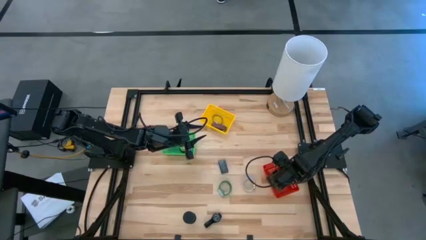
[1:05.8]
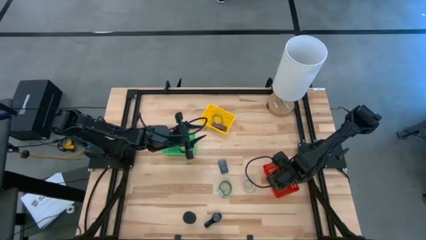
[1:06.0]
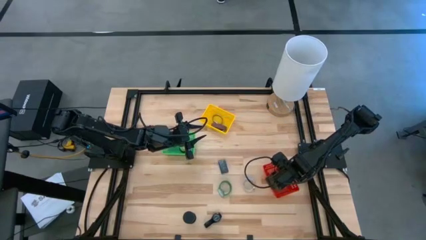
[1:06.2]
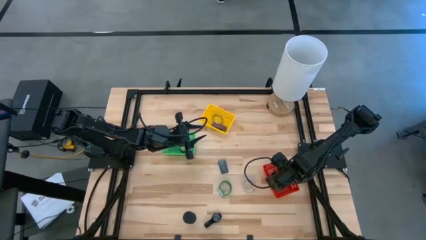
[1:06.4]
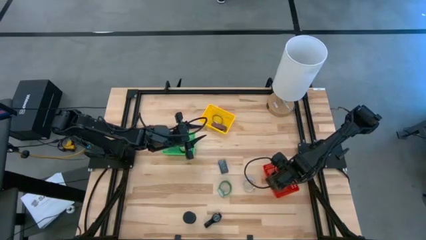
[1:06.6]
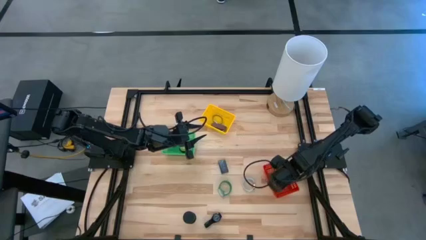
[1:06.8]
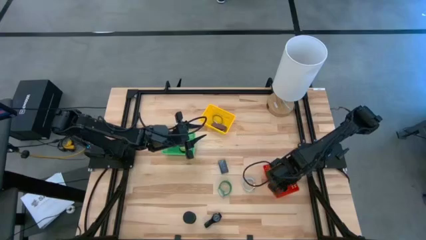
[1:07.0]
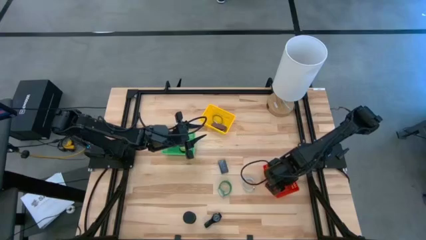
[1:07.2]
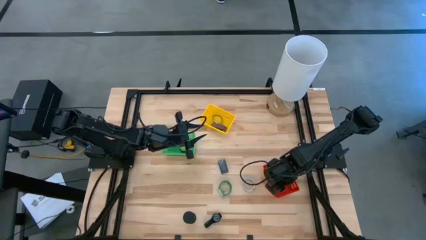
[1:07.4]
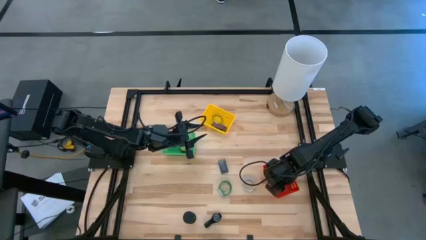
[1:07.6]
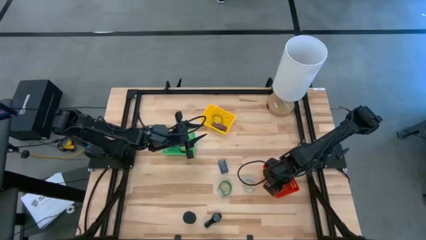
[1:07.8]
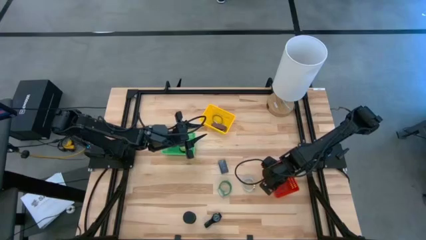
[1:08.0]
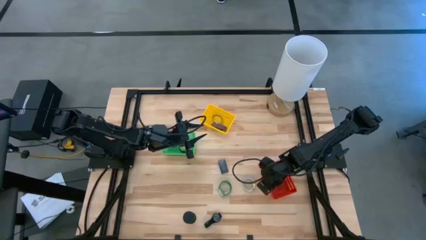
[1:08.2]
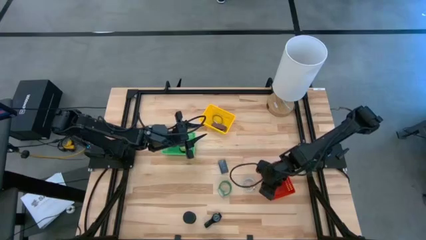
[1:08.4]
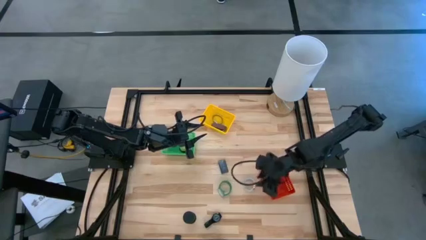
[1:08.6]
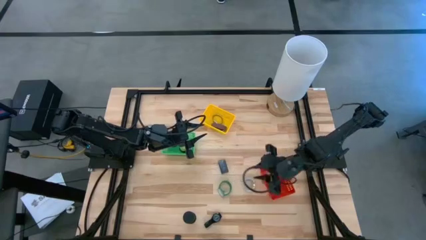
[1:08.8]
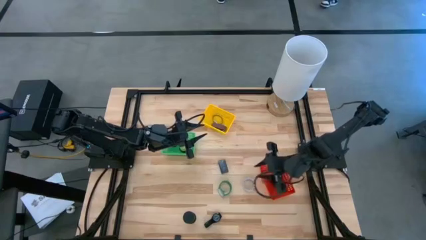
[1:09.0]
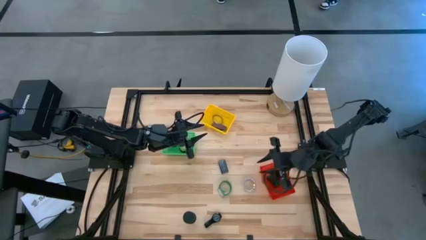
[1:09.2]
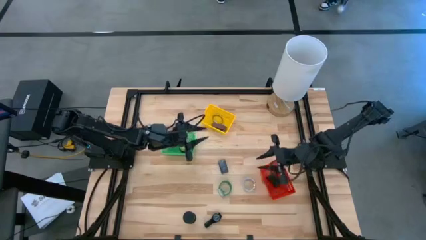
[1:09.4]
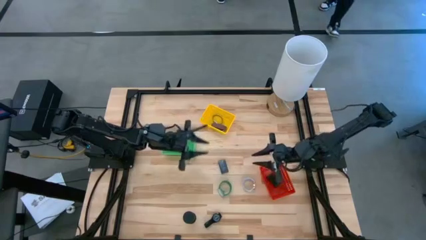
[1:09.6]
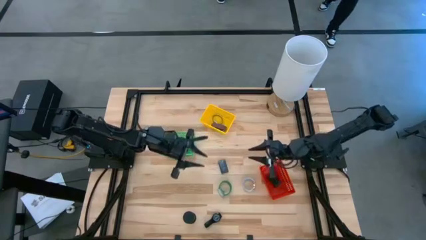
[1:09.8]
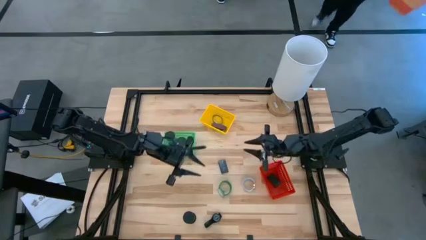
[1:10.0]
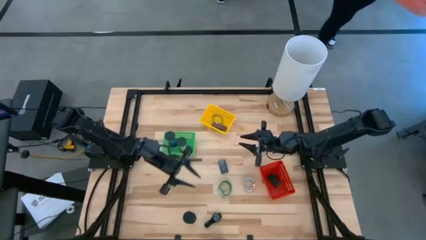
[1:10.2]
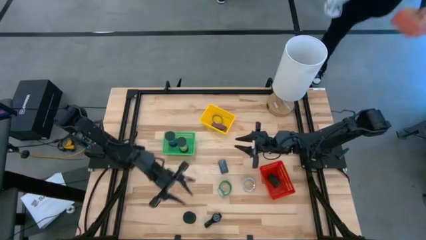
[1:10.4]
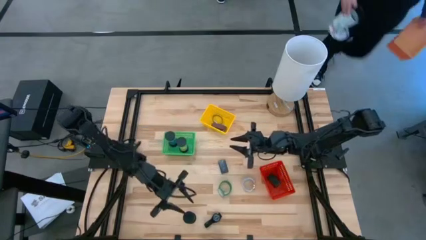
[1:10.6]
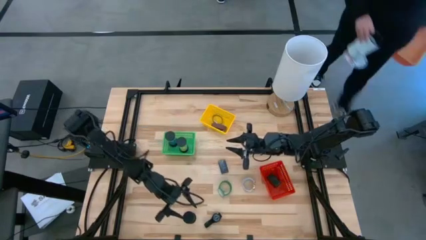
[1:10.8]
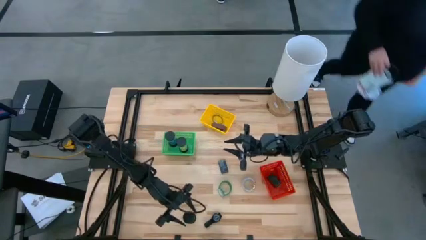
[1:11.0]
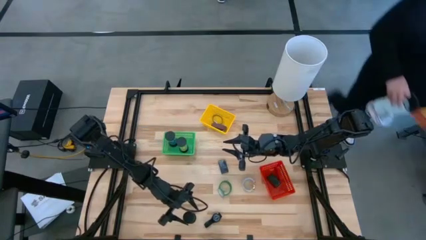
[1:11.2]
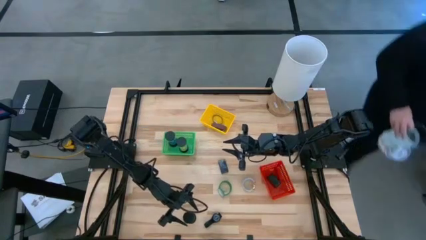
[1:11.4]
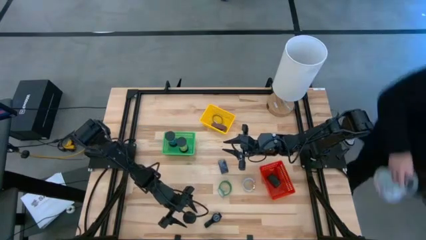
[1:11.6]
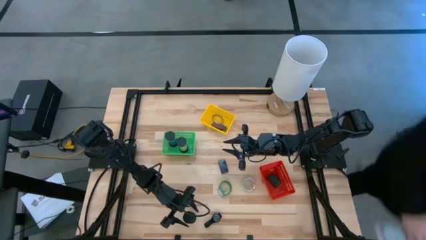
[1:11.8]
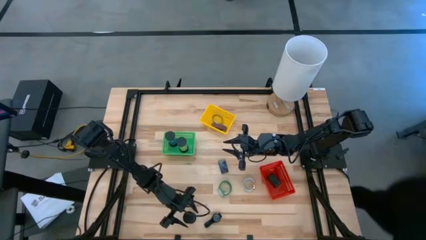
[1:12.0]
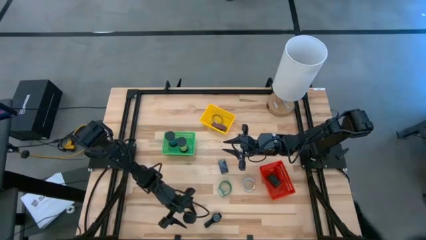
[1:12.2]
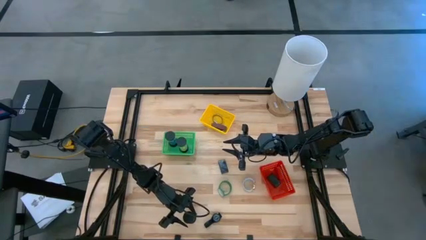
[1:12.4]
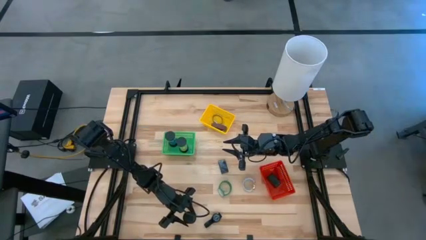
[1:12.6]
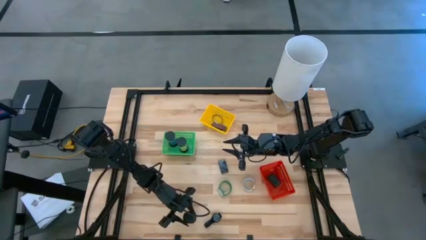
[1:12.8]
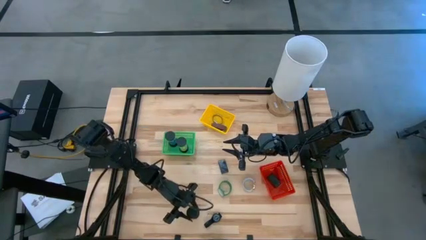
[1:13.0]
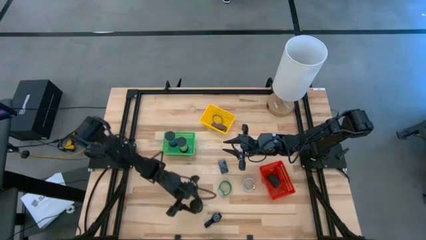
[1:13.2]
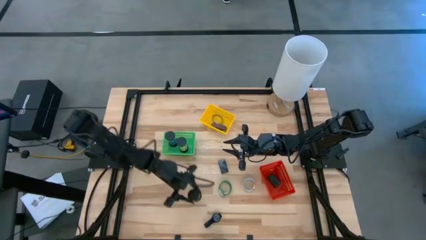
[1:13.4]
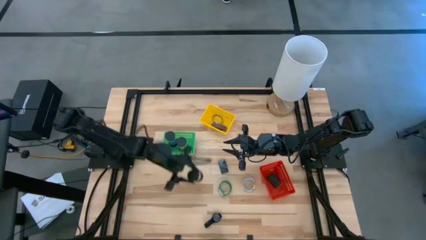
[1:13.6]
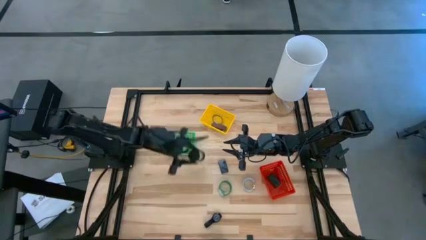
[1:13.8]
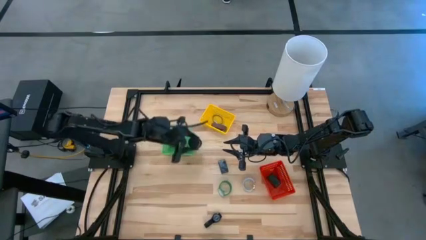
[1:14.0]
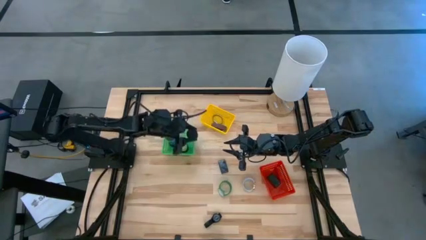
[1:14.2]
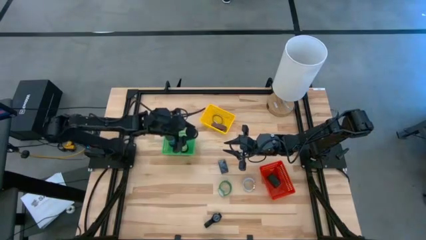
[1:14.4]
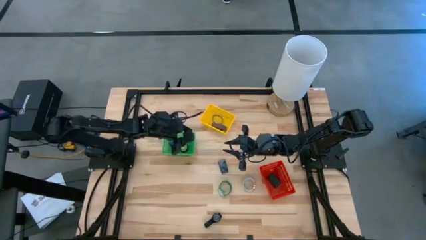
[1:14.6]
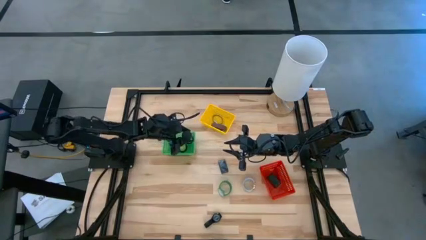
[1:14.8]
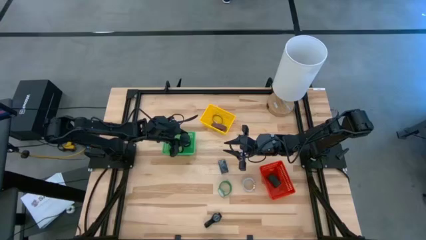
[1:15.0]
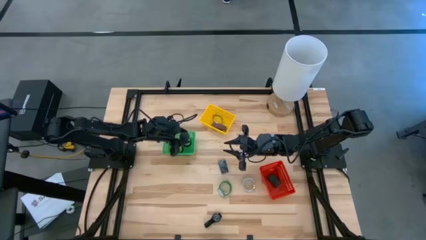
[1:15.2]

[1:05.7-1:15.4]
Task: Pick & Place Office items
Put the green hourglass into the green basket

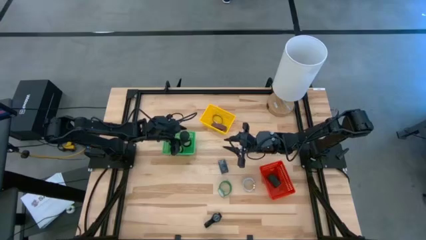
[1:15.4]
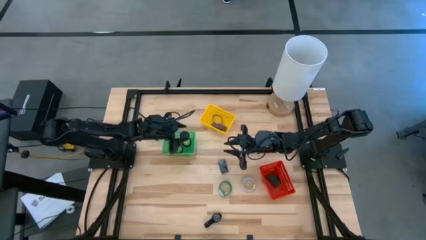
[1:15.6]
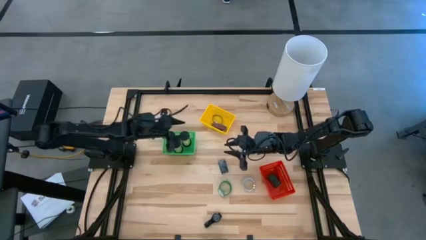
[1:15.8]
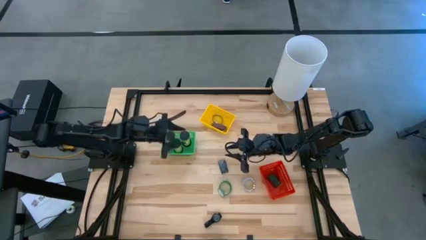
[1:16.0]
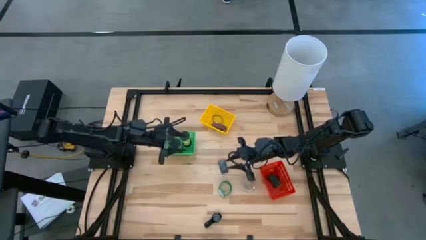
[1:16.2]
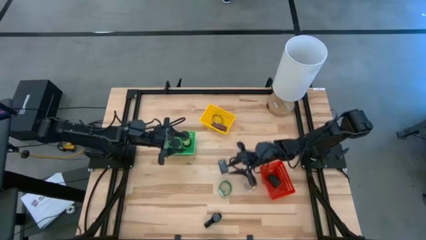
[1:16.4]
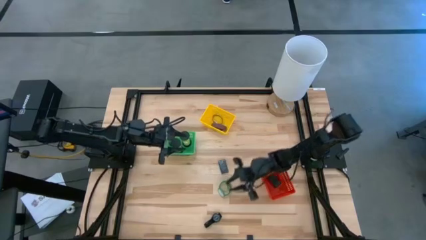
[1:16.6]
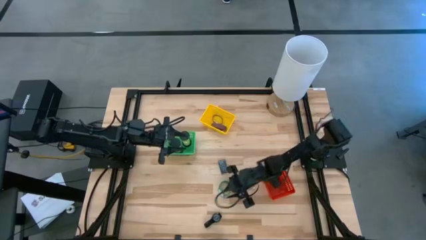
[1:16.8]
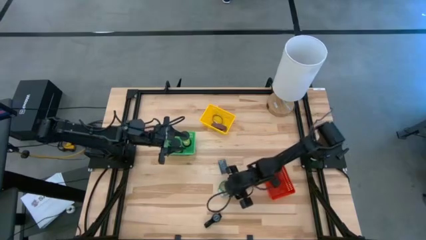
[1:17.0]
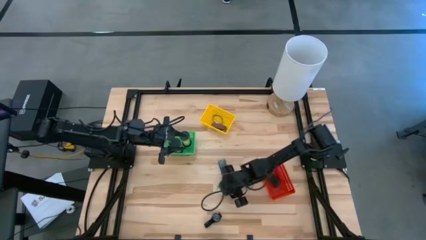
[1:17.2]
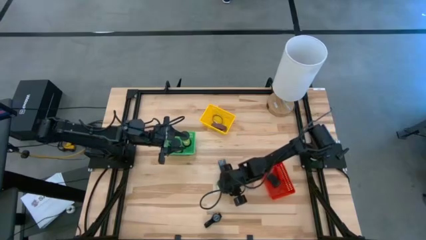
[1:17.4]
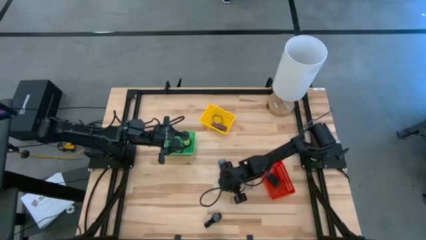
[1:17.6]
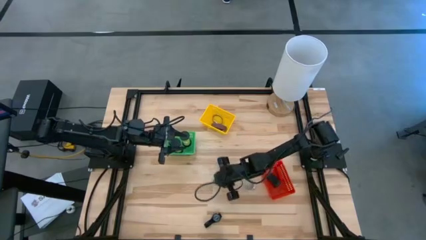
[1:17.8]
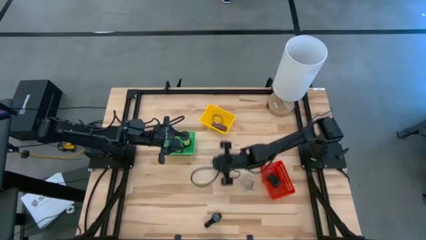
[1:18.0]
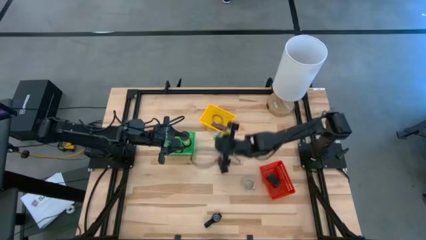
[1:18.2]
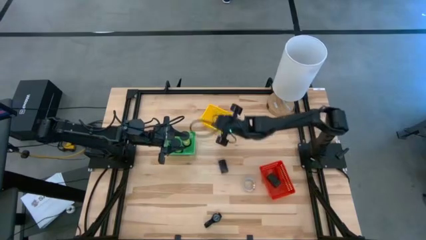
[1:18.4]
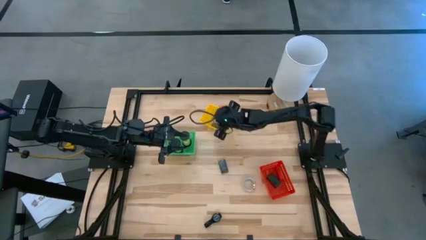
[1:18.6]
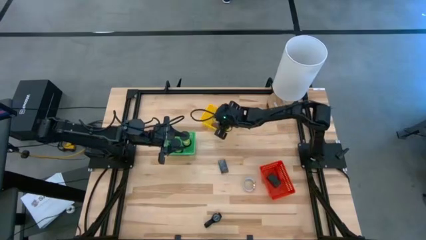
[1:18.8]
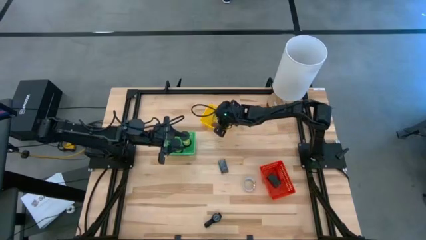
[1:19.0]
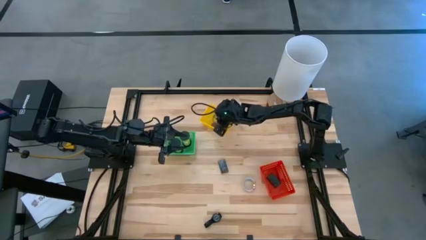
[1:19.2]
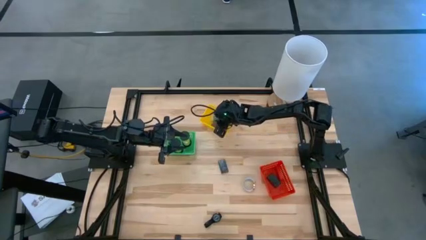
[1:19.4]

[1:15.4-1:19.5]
Put the green watch into the yellow basket
